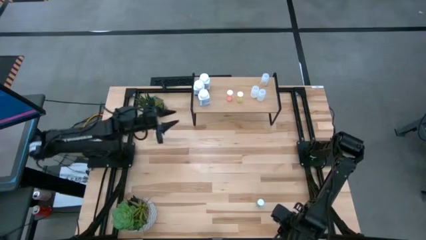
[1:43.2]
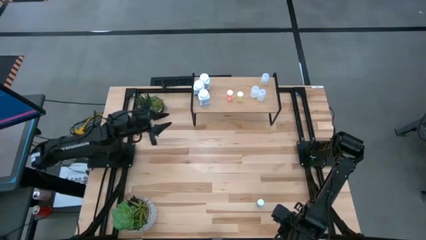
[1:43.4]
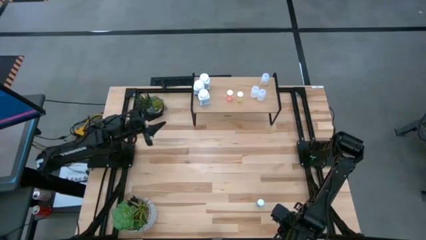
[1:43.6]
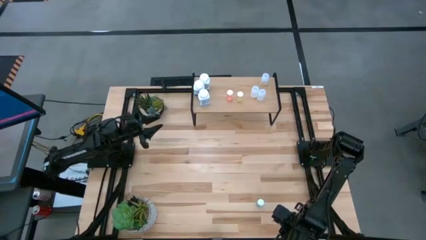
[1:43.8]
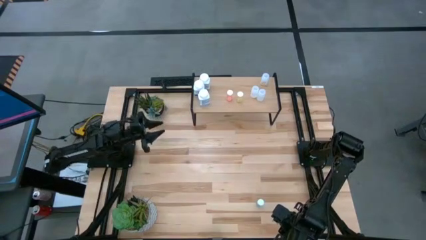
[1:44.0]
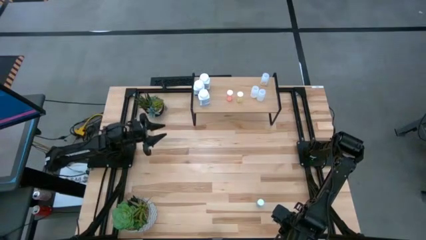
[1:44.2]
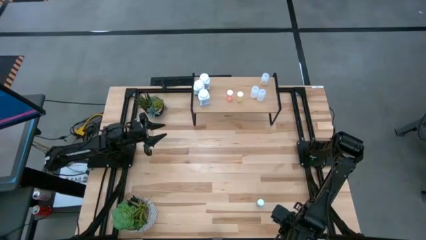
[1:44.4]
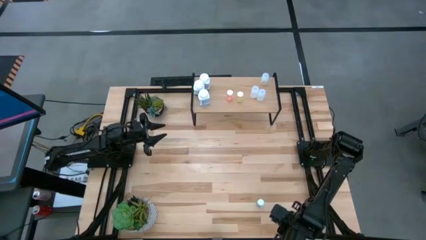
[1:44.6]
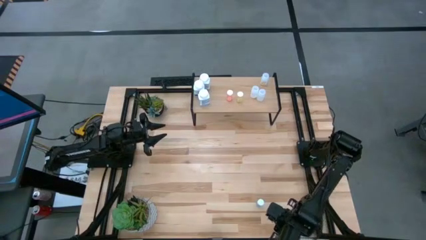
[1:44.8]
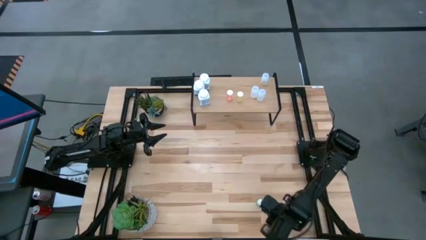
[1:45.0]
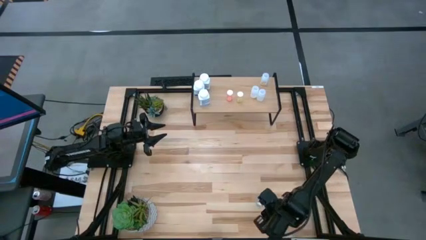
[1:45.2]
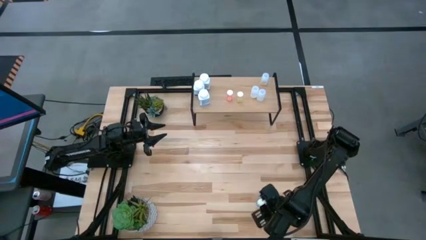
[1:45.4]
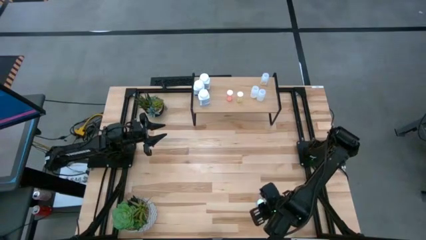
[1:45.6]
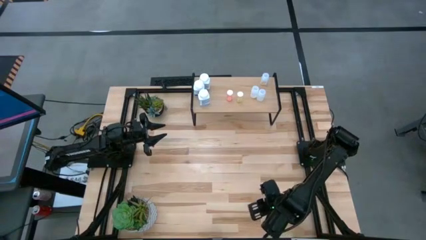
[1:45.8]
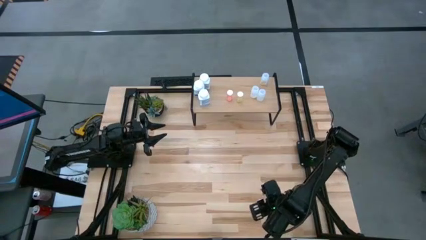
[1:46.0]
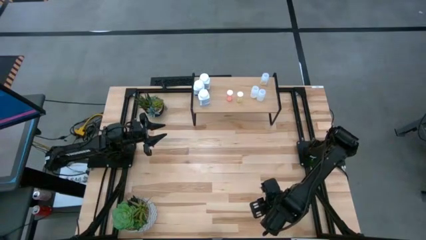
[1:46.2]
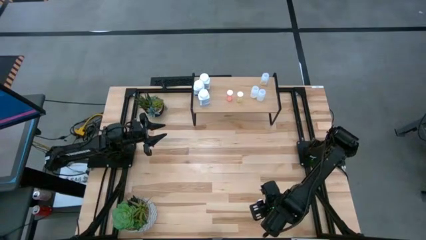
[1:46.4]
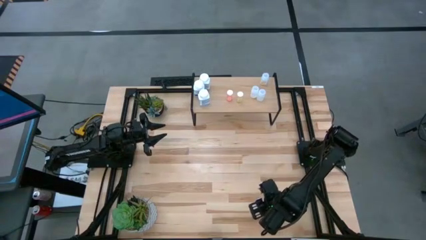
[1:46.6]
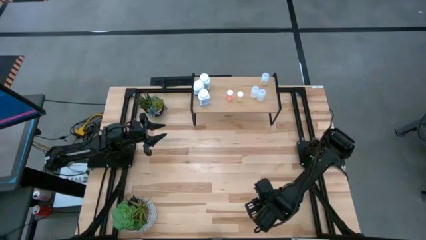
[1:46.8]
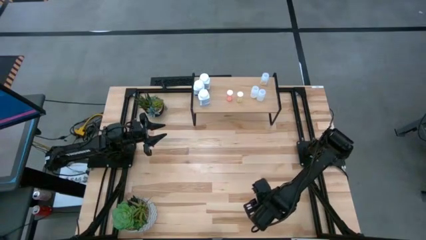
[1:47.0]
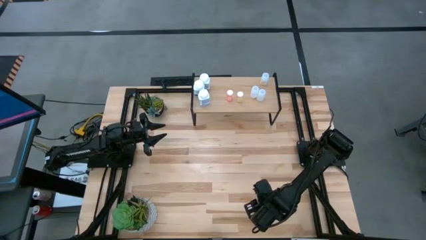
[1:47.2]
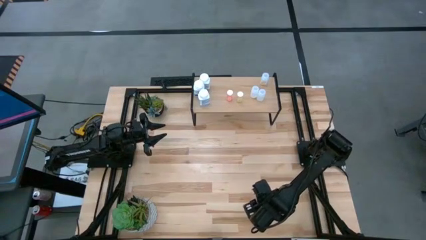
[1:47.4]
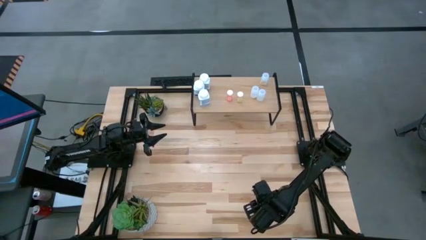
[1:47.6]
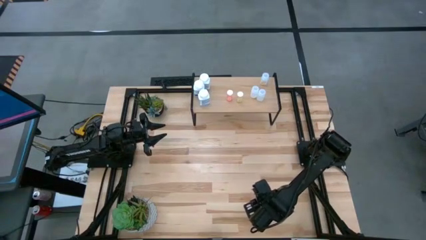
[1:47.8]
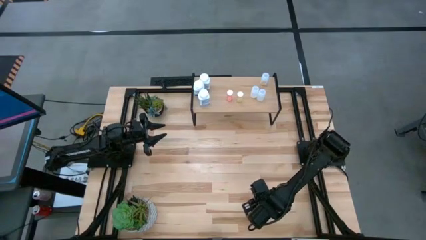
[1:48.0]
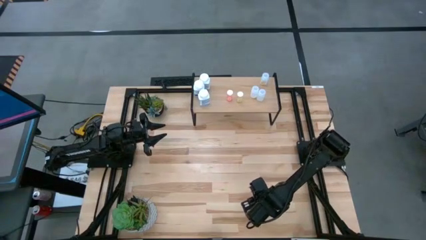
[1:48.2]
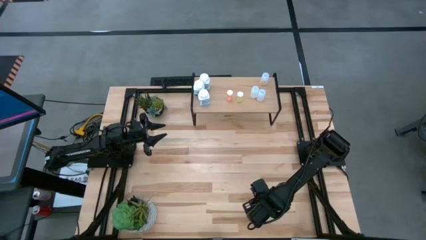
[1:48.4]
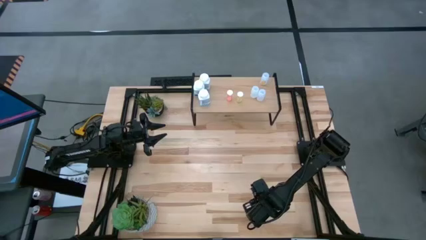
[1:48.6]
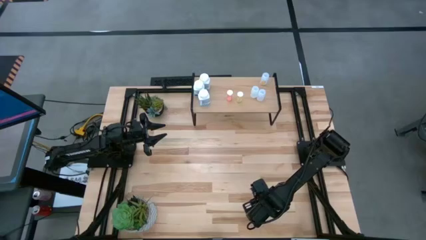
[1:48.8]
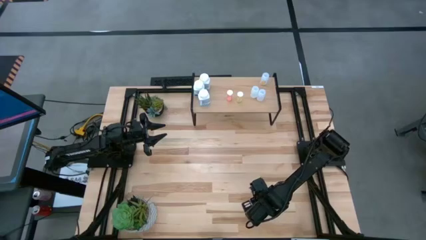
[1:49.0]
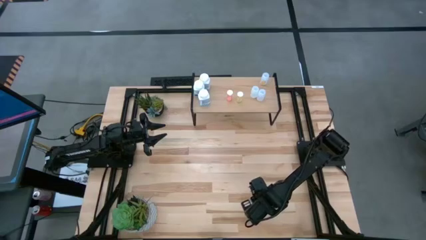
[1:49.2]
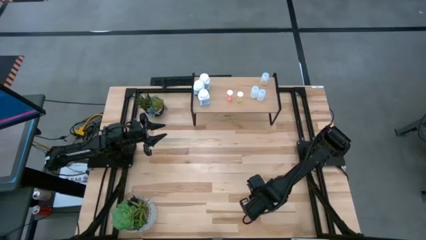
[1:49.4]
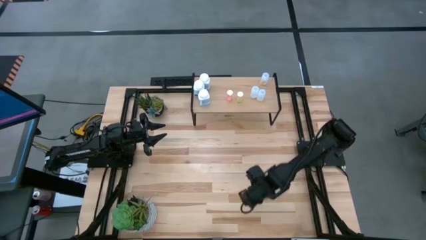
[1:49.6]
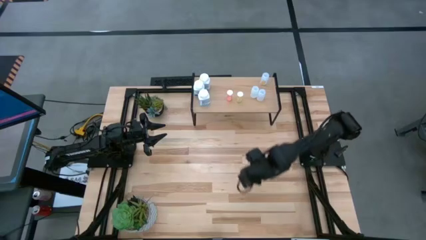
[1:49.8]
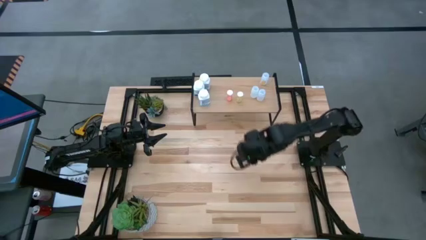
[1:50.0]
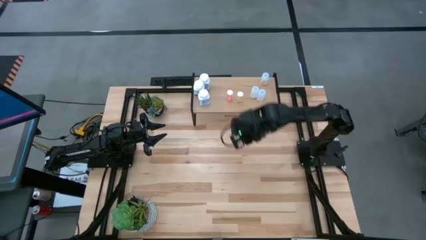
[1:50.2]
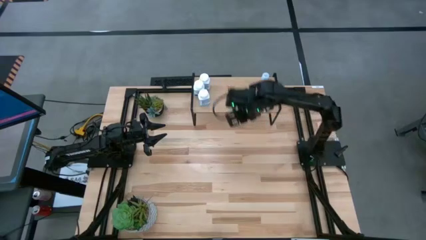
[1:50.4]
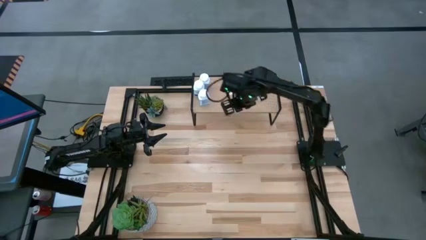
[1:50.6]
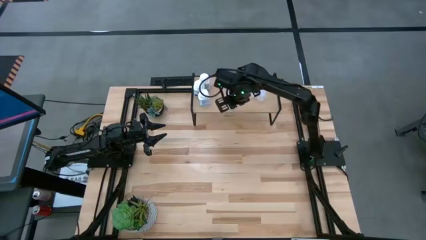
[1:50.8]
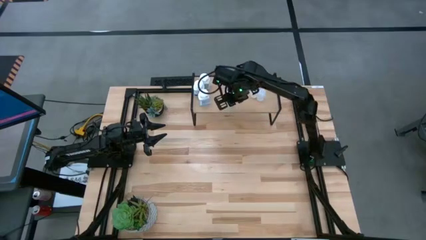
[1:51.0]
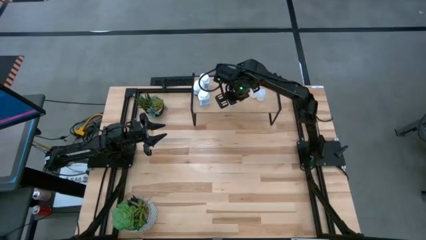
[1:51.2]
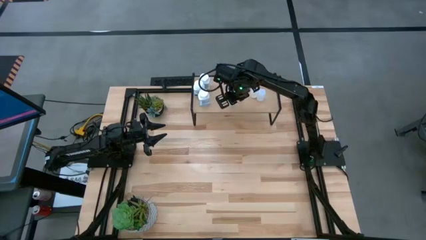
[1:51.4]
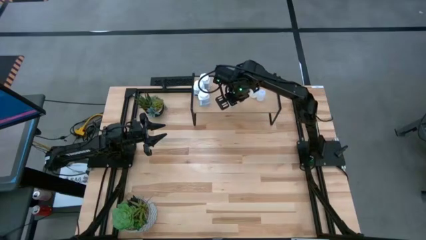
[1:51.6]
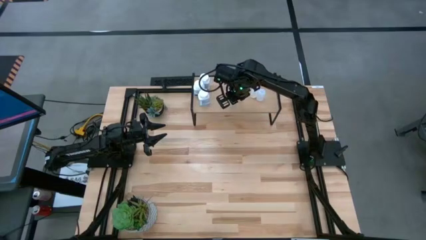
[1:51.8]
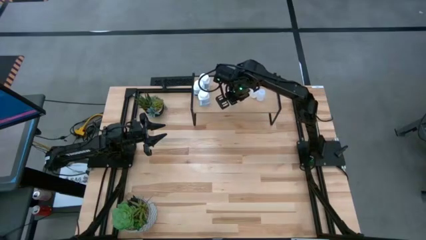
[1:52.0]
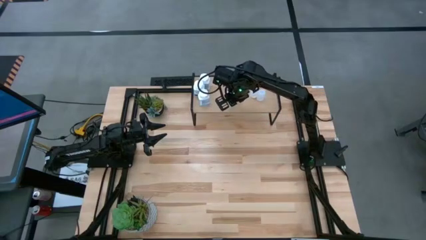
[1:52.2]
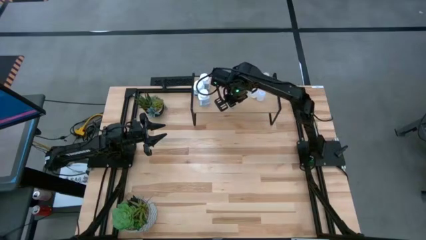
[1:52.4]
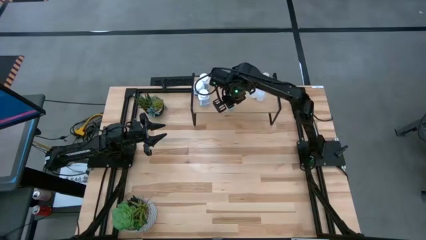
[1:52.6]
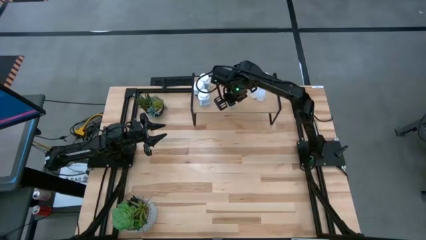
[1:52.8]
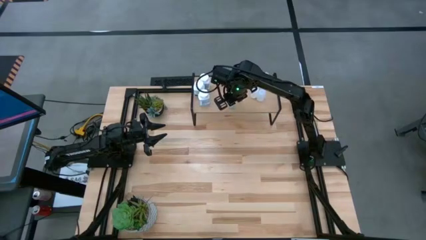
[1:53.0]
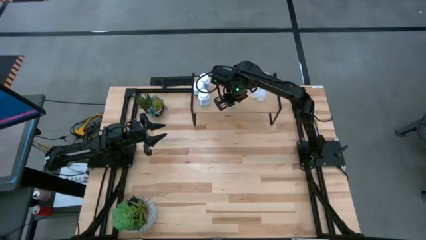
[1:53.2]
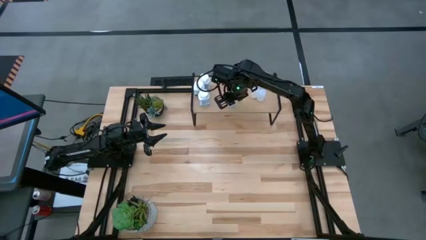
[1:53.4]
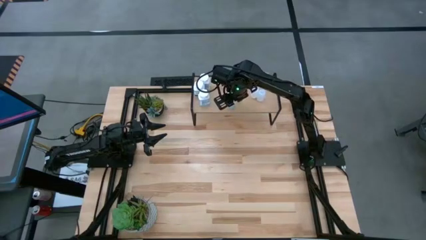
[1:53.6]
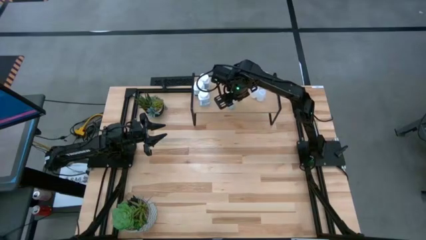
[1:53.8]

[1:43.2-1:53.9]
Task: Pick and place medicine bottles onto shelf by color
Put the blue pill bottle on the shelf

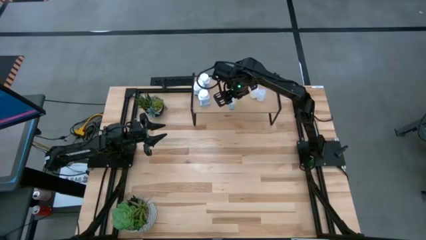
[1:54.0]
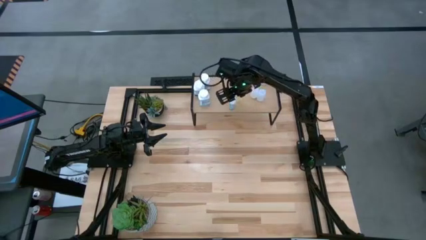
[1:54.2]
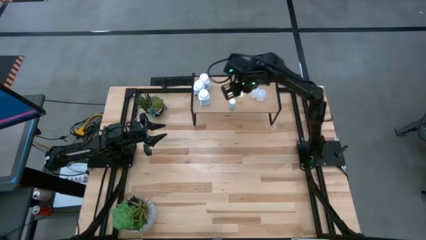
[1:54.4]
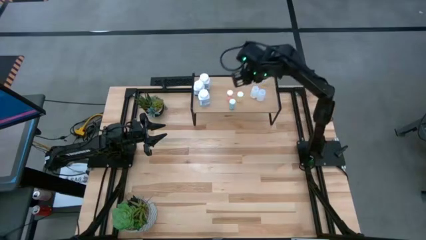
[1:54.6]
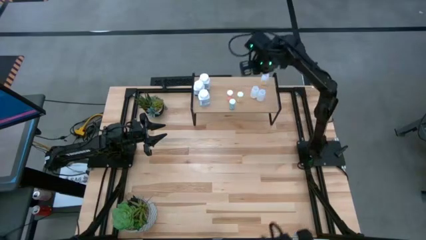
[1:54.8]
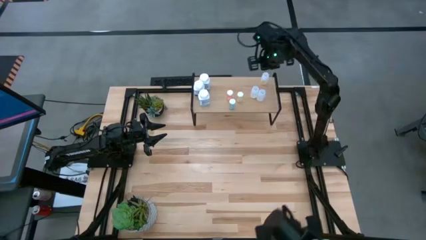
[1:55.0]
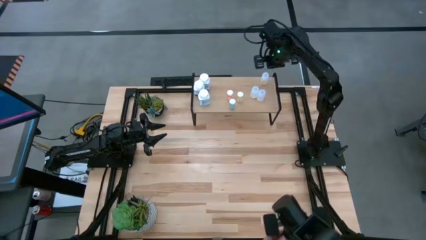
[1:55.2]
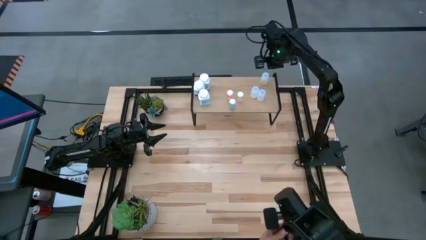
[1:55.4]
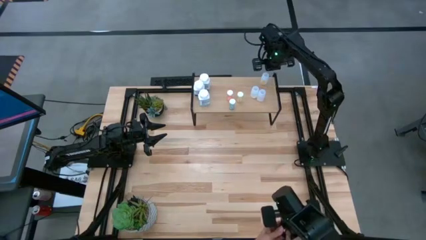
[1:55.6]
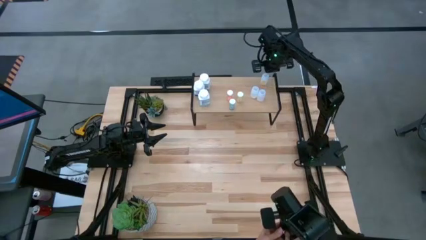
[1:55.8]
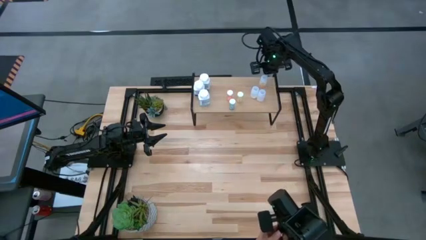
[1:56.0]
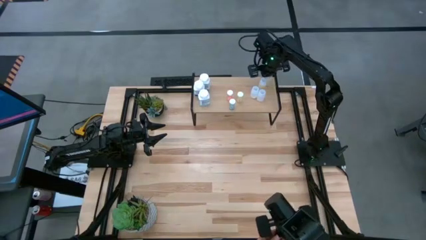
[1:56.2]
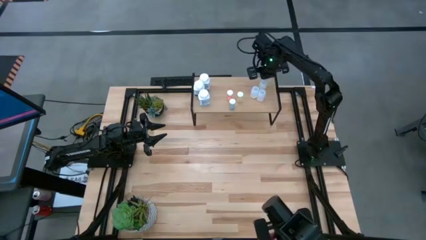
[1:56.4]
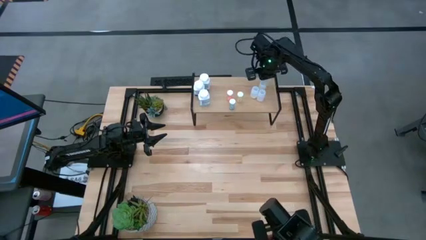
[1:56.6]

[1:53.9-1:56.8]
Adjust the transparent pill bottle on the shelf
